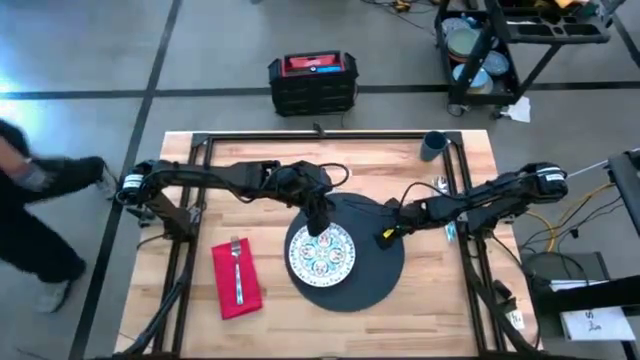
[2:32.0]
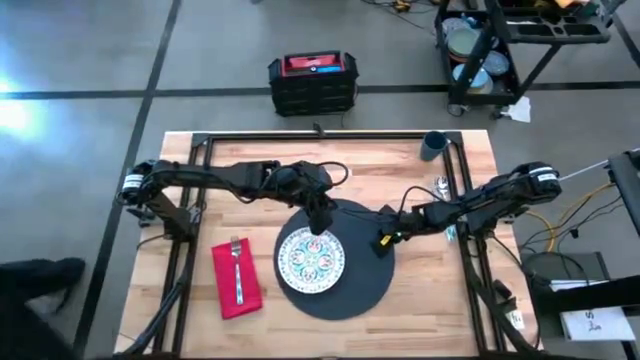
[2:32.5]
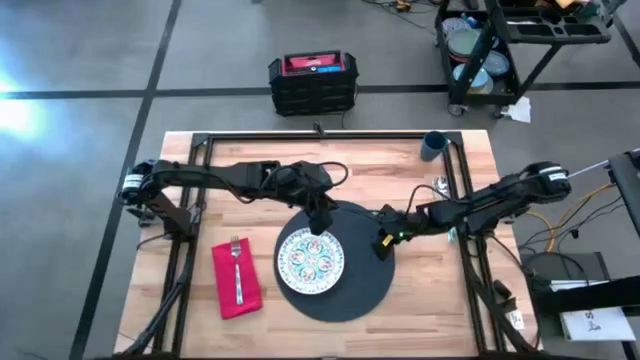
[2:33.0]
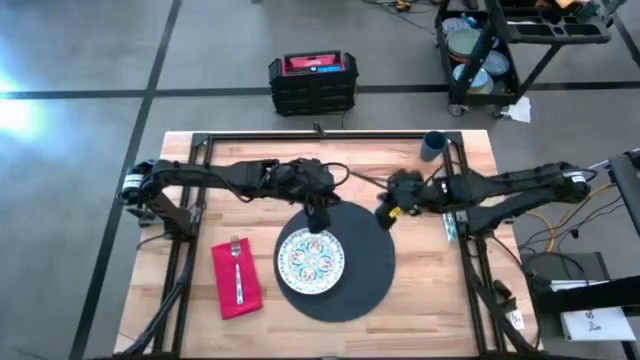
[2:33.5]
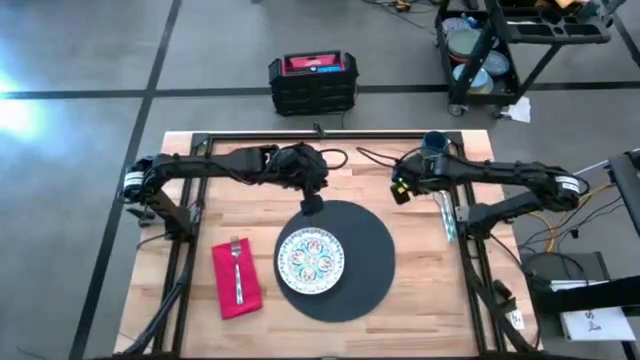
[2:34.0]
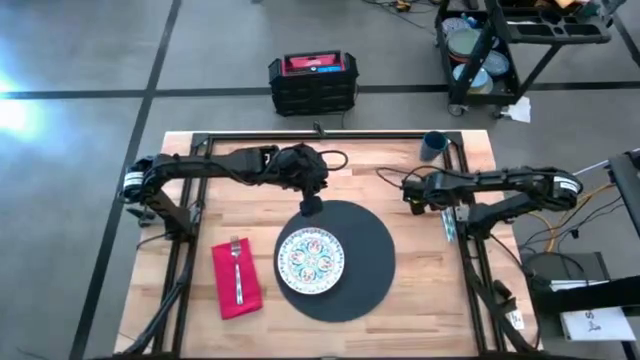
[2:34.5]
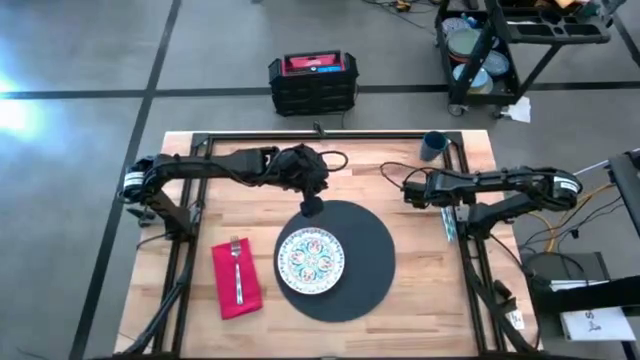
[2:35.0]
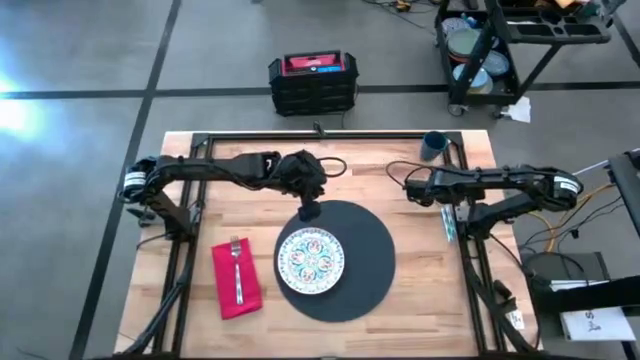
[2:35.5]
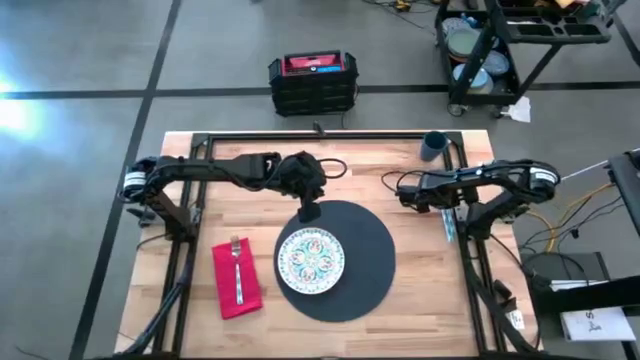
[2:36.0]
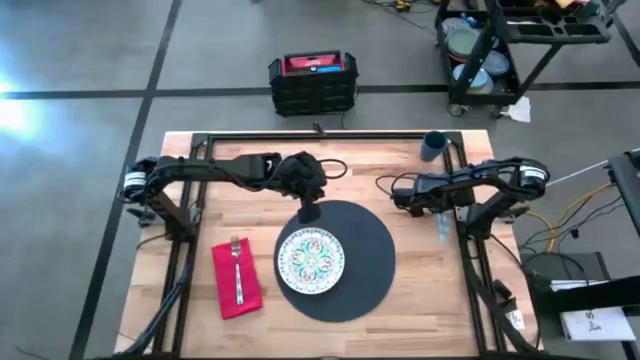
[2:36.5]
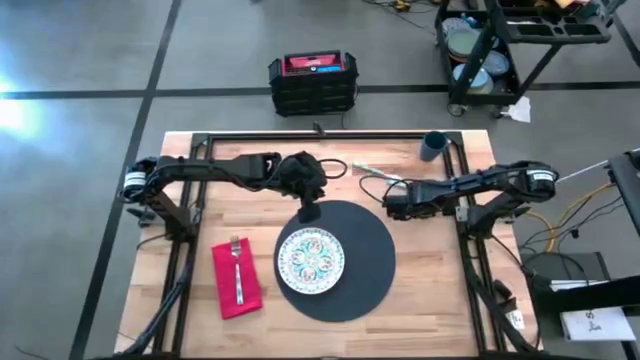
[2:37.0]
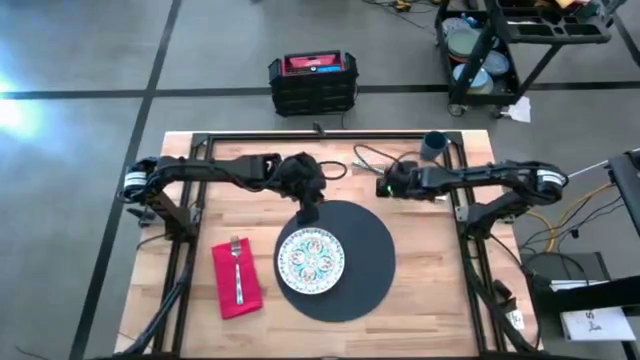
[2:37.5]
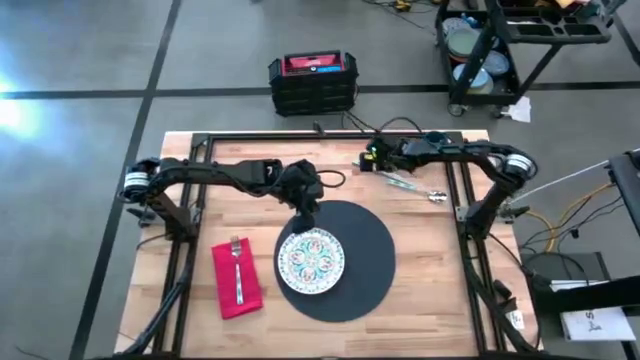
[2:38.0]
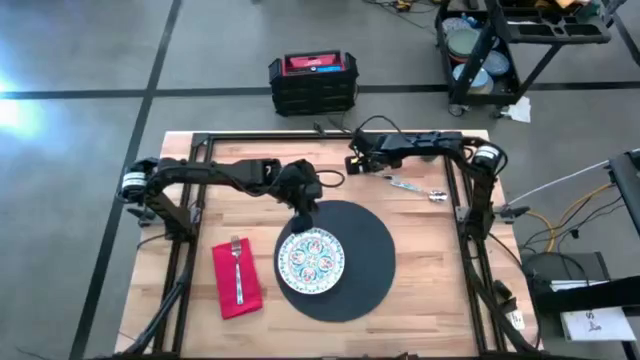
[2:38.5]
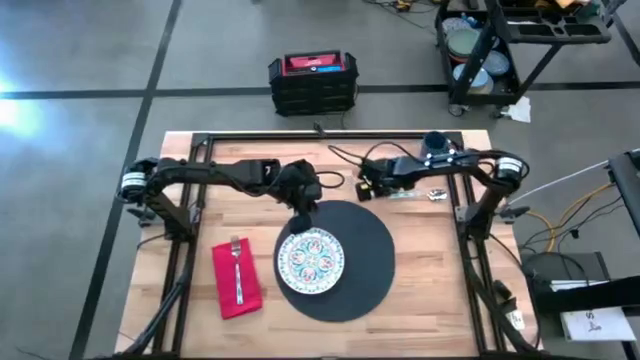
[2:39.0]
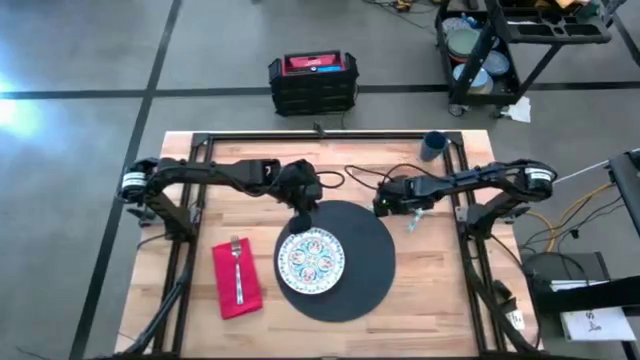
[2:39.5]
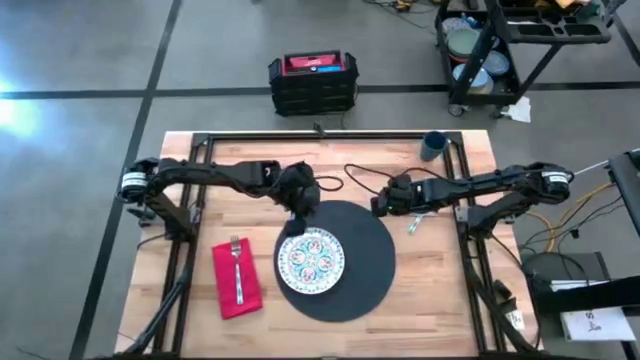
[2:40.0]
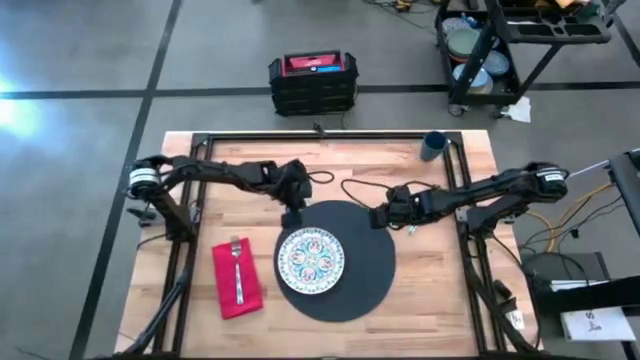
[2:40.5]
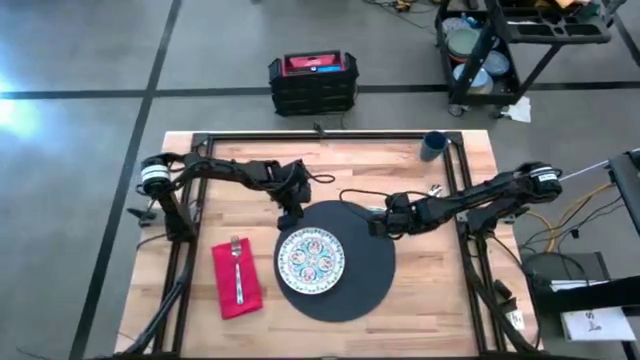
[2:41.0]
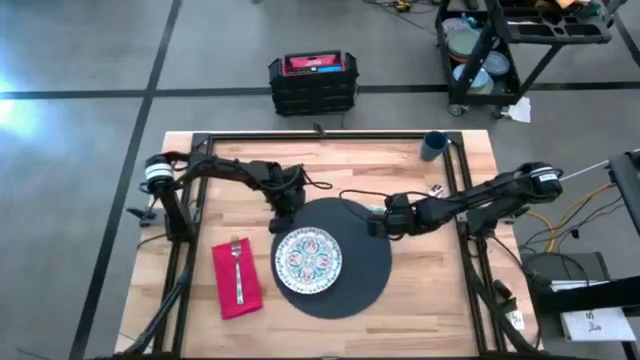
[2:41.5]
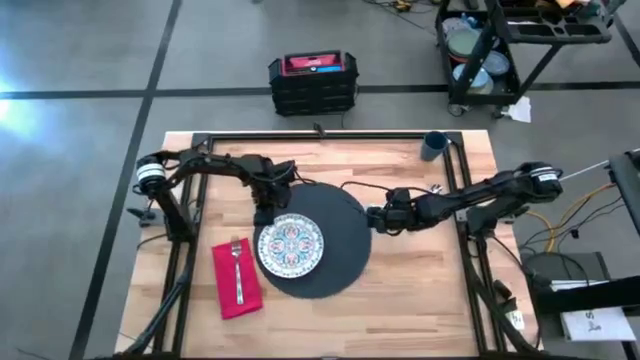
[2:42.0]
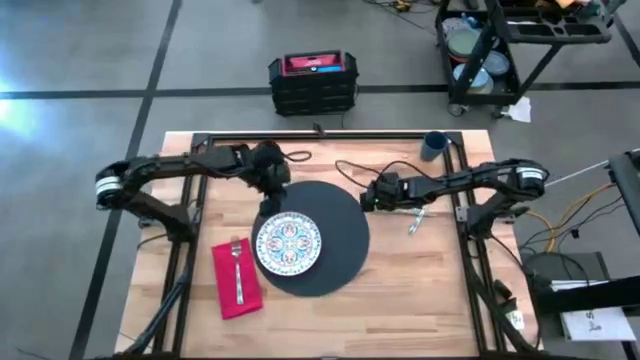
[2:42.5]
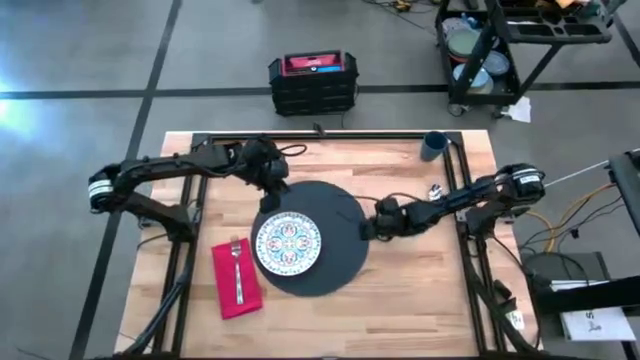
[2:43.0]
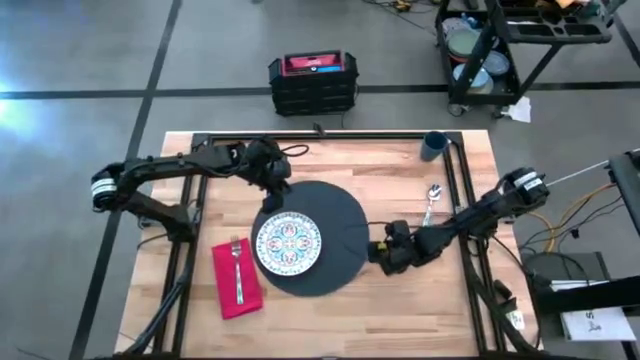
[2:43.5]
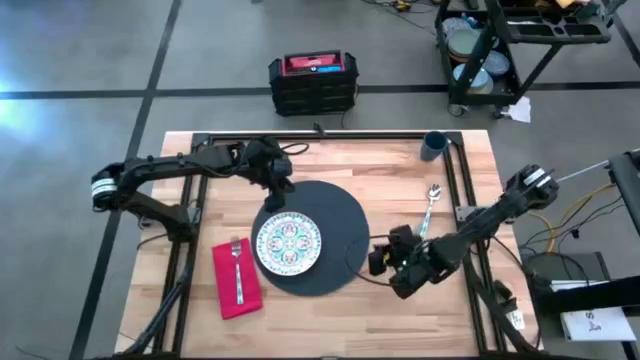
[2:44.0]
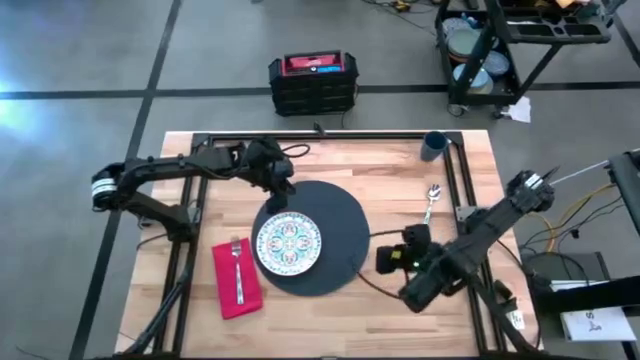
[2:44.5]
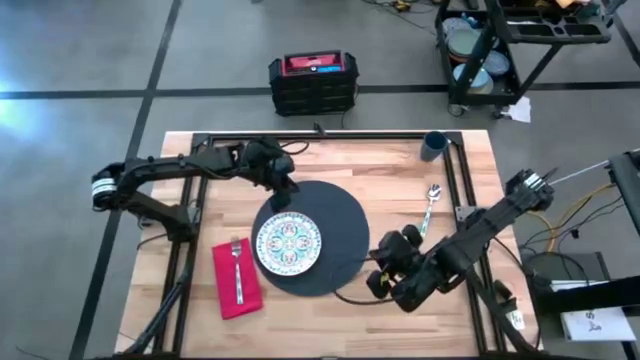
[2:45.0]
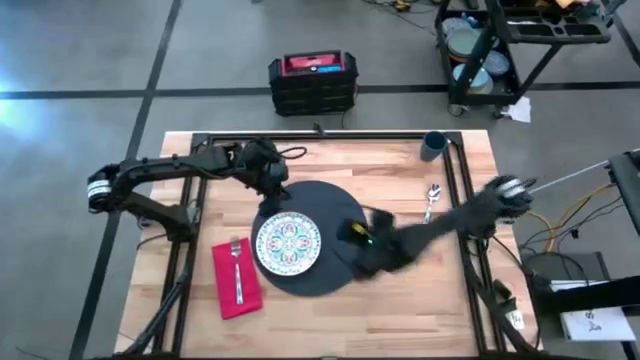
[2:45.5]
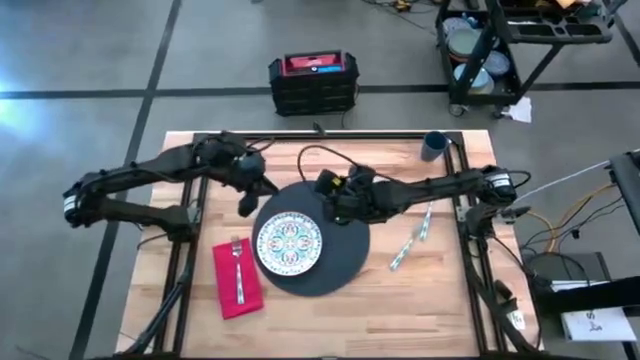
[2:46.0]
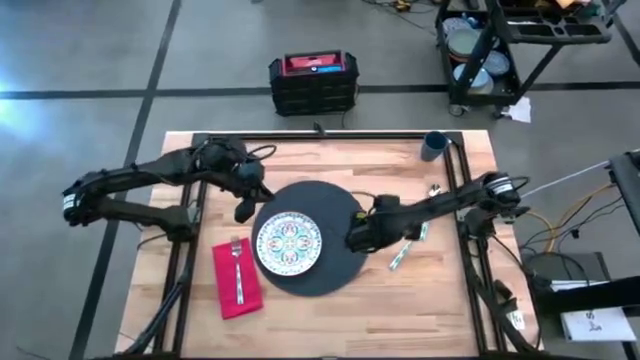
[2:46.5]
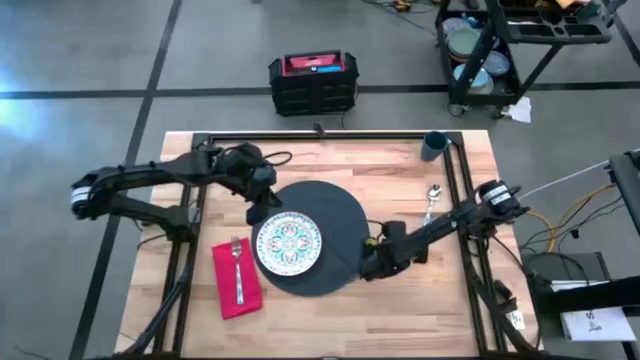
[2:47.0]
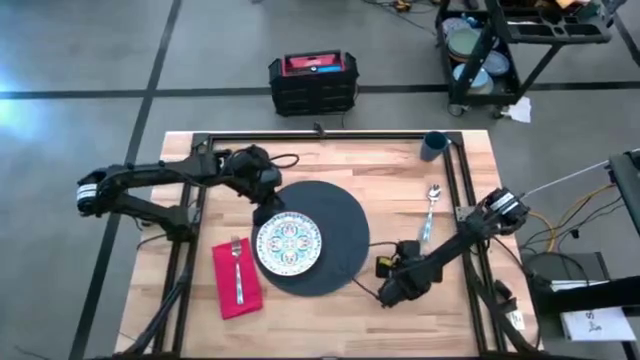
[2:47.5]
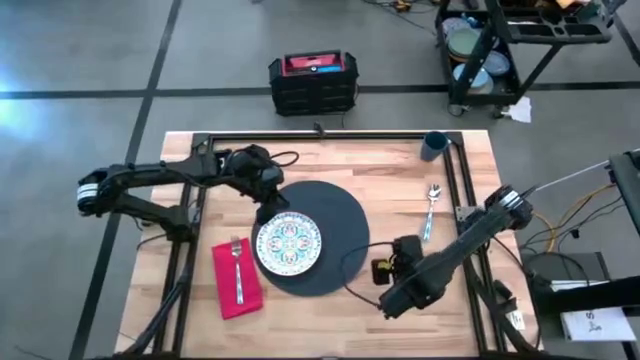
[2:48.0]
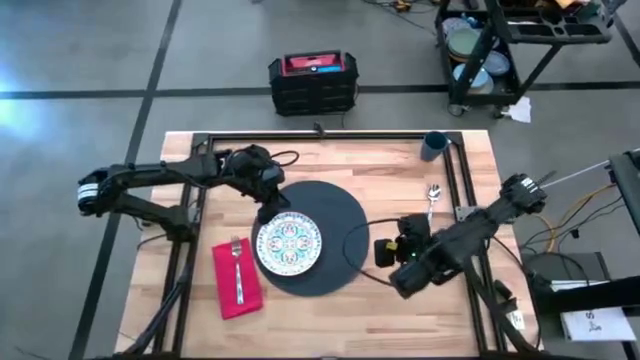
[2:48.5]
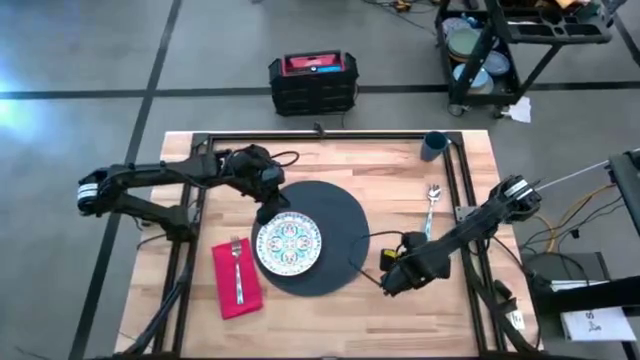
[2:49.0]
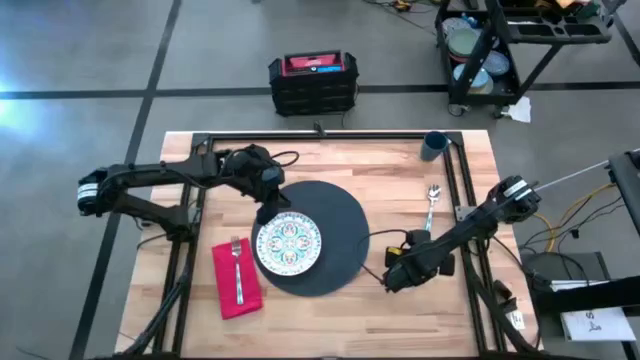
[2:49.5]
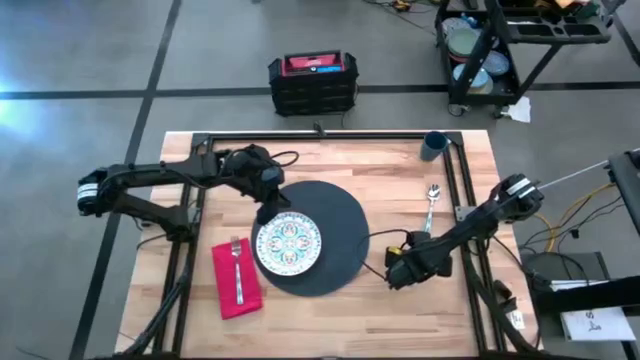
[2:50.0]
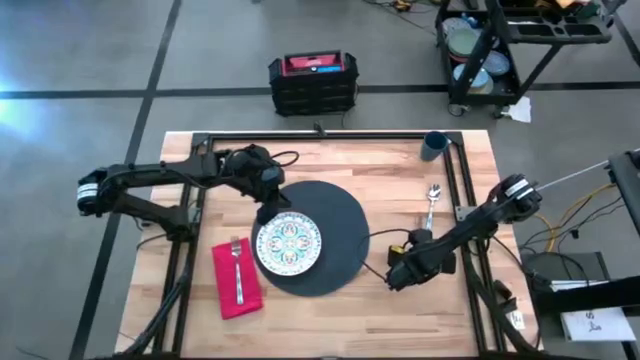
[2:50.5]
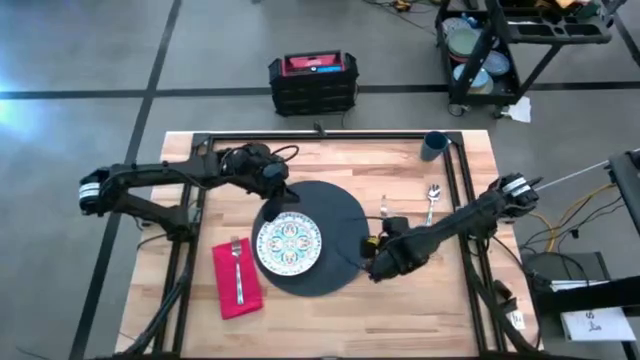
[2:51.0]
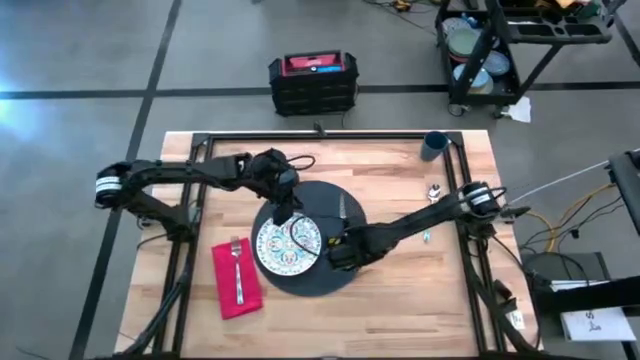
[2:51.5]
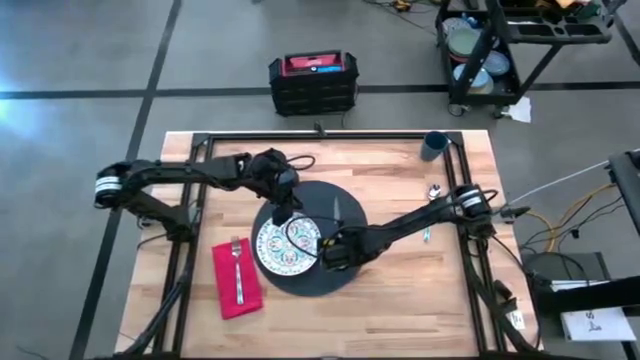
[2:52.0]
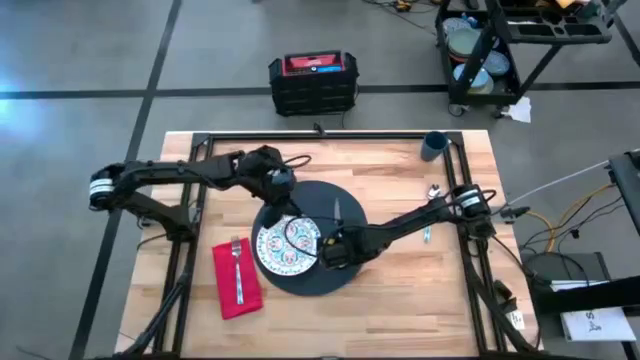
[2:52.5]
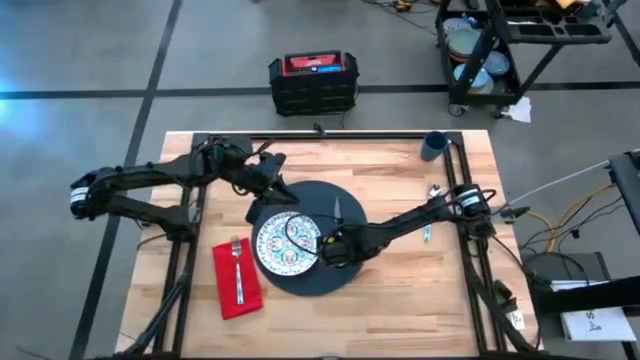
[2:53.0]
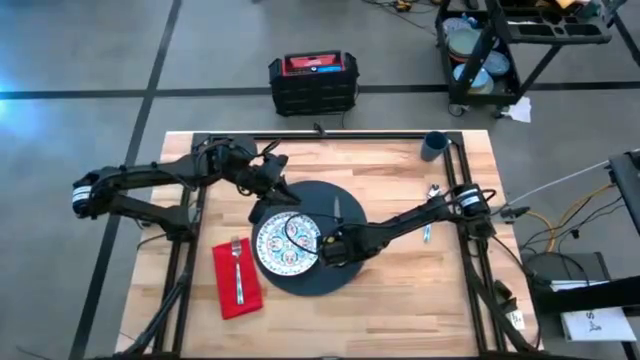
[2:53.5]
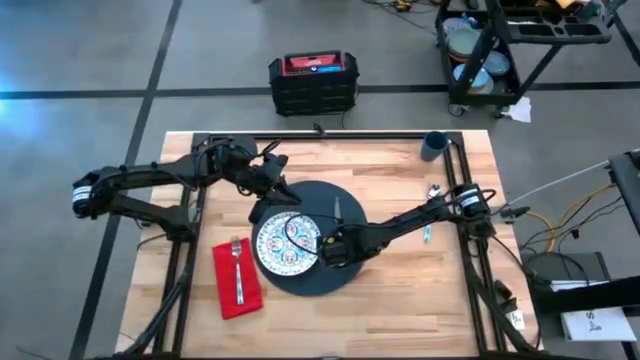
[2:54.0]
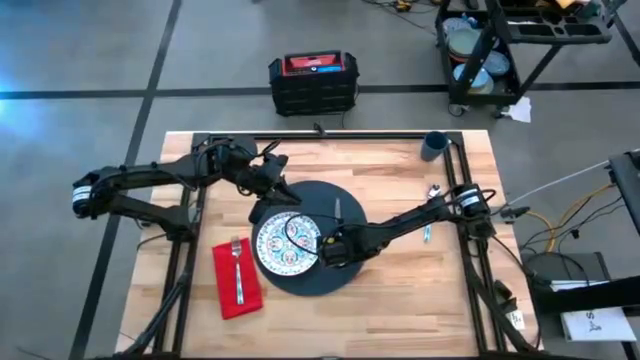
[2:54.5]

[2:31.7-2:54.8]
Task: Set table place
Put the blue knife on the black placemat
